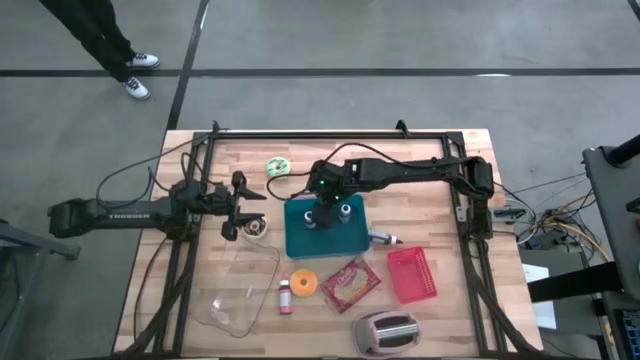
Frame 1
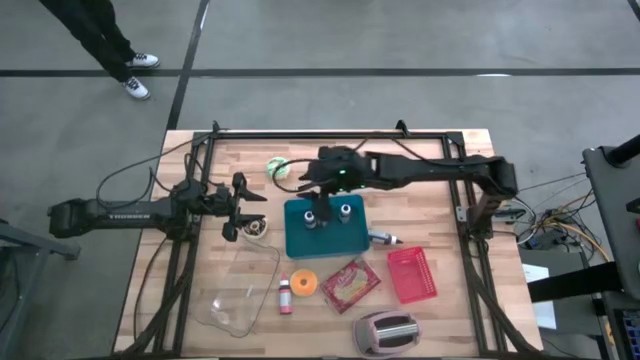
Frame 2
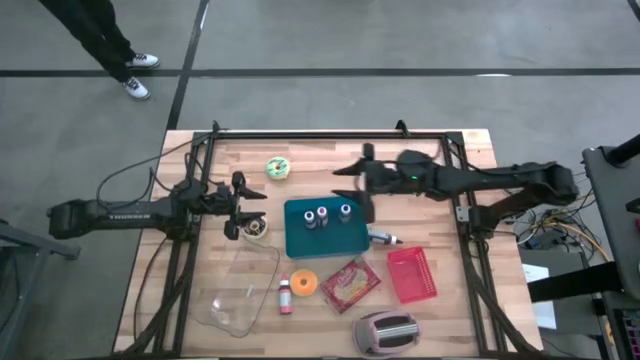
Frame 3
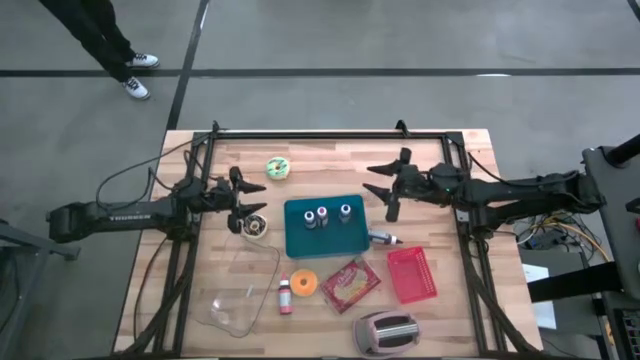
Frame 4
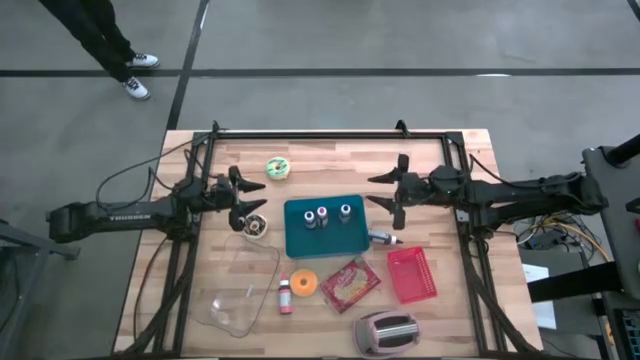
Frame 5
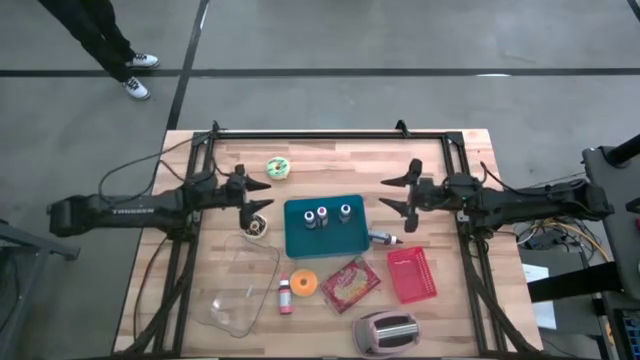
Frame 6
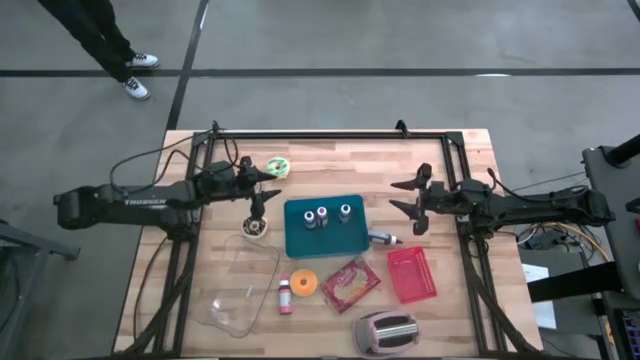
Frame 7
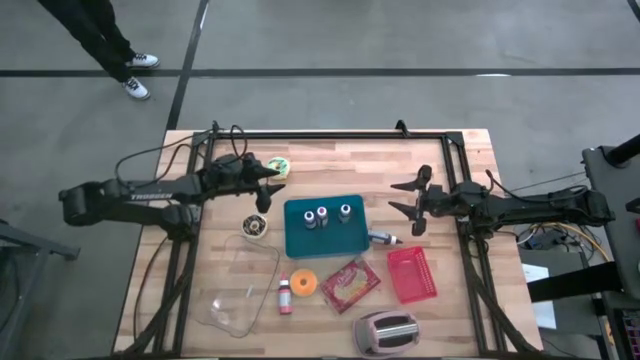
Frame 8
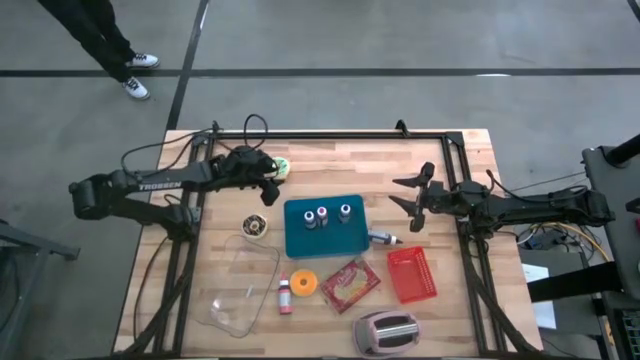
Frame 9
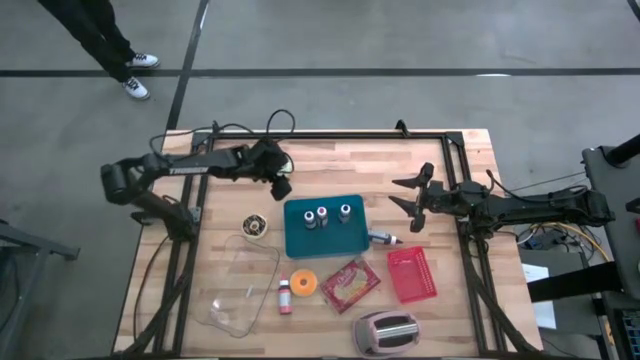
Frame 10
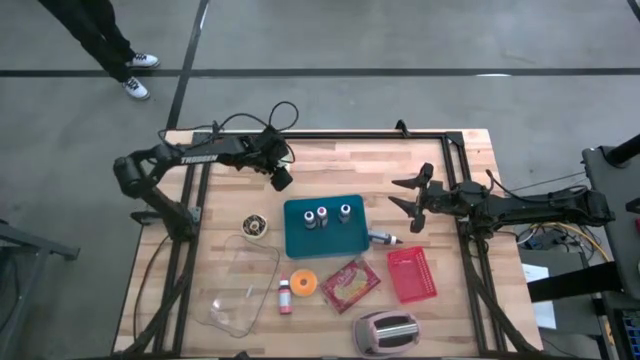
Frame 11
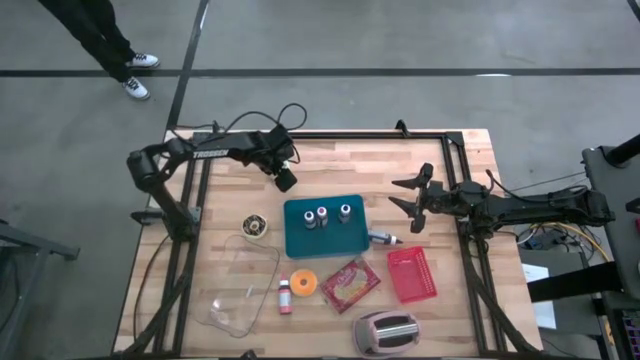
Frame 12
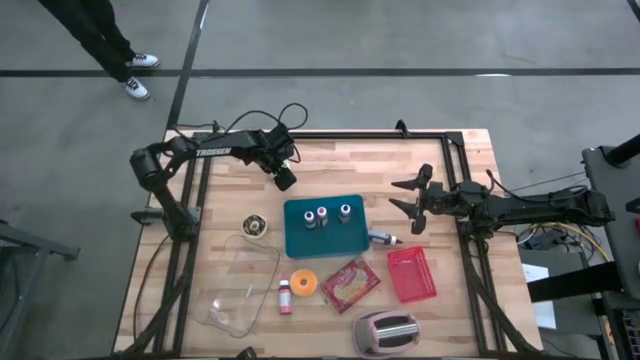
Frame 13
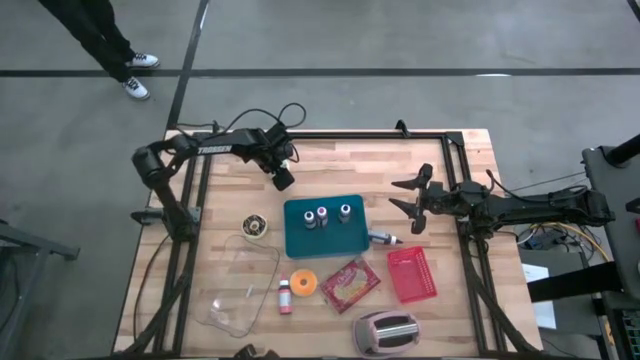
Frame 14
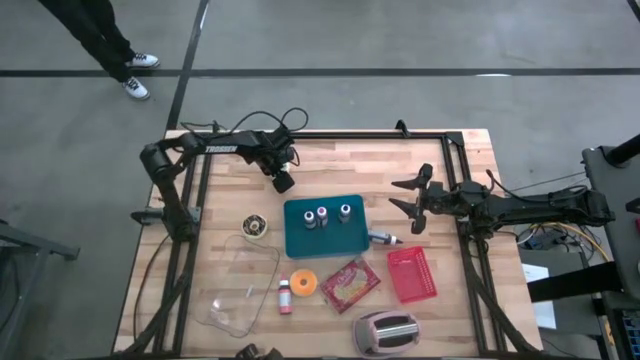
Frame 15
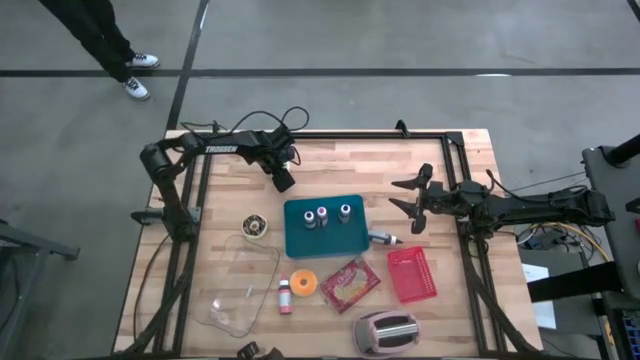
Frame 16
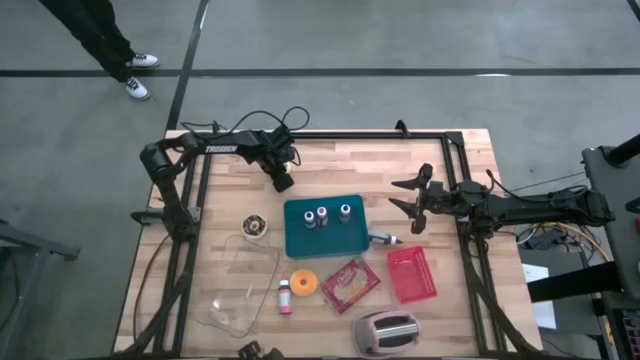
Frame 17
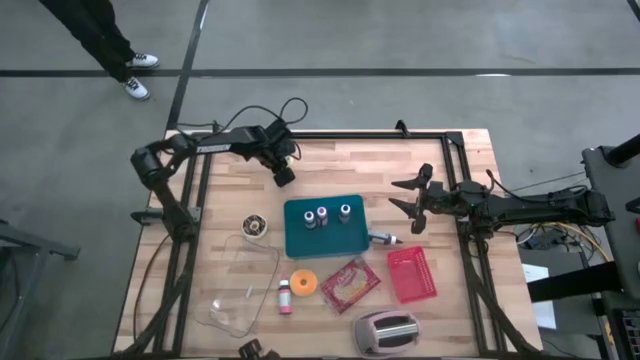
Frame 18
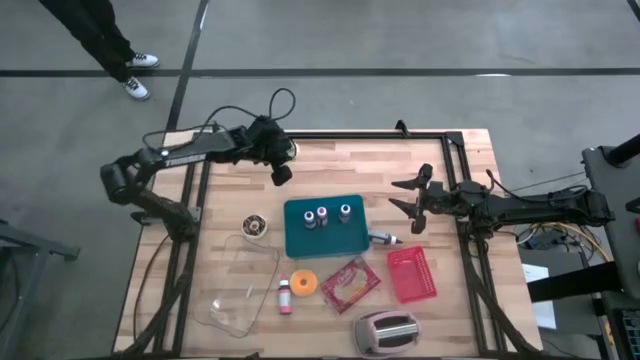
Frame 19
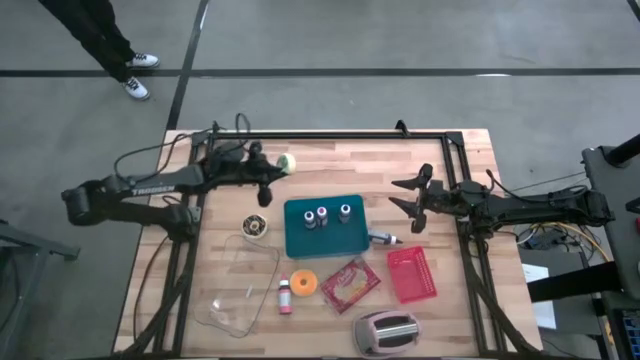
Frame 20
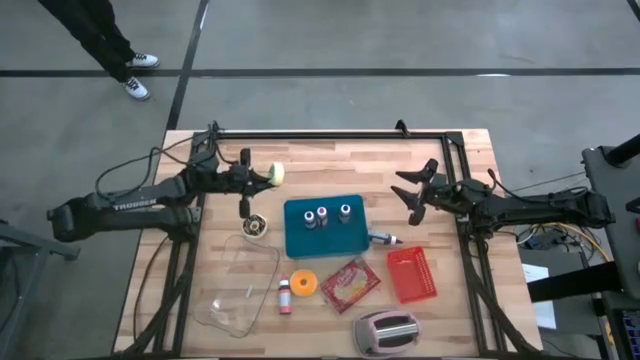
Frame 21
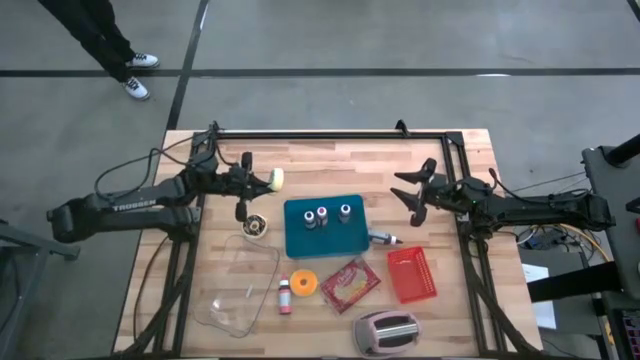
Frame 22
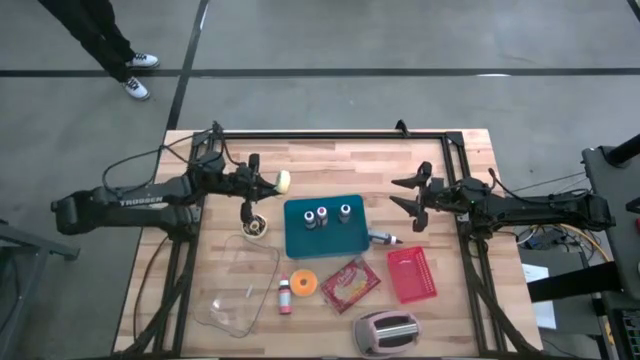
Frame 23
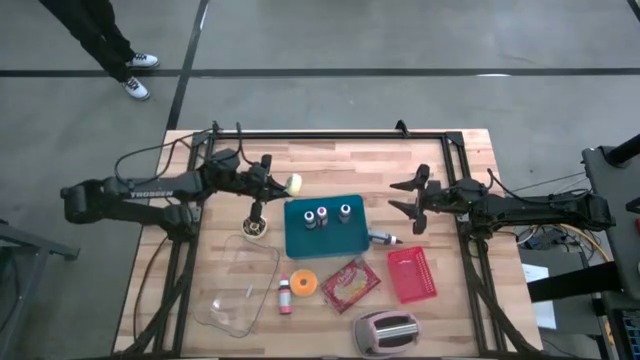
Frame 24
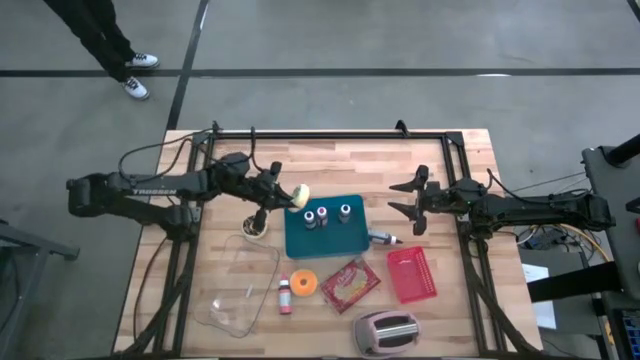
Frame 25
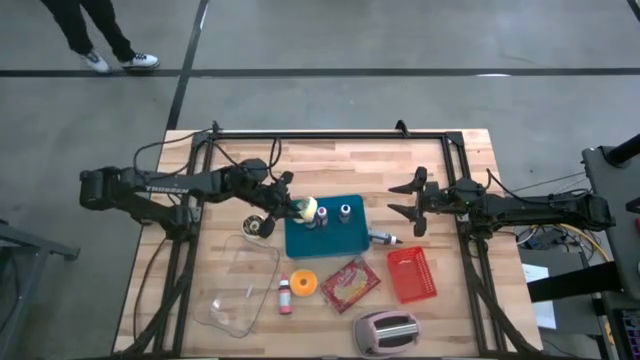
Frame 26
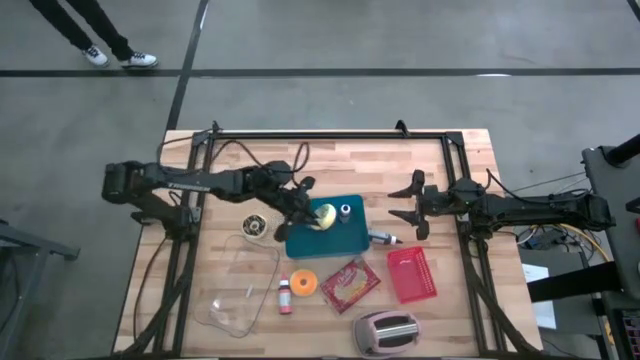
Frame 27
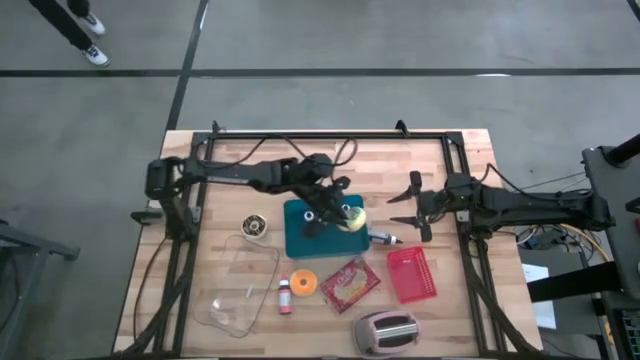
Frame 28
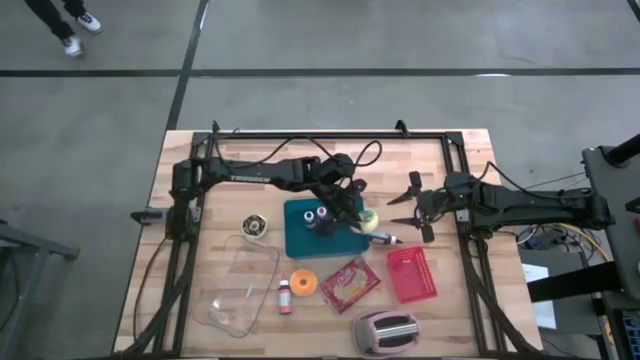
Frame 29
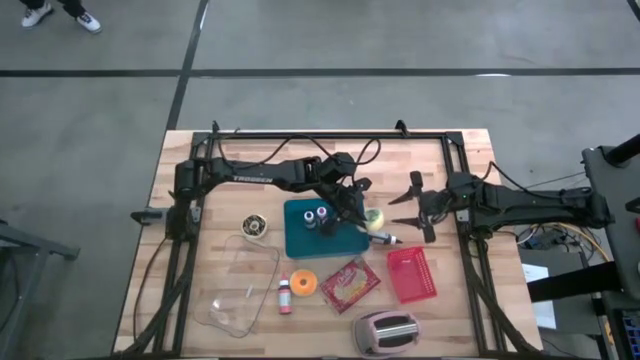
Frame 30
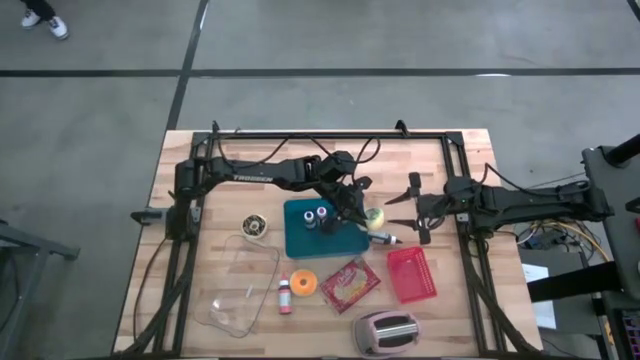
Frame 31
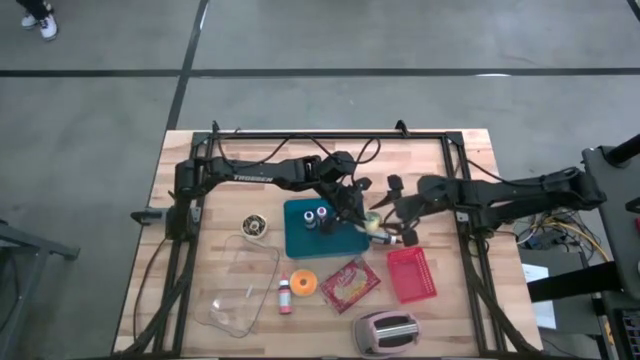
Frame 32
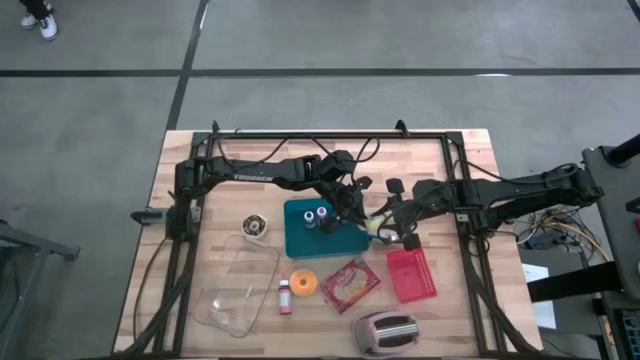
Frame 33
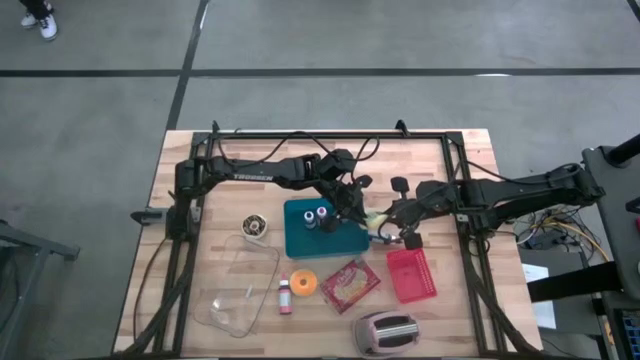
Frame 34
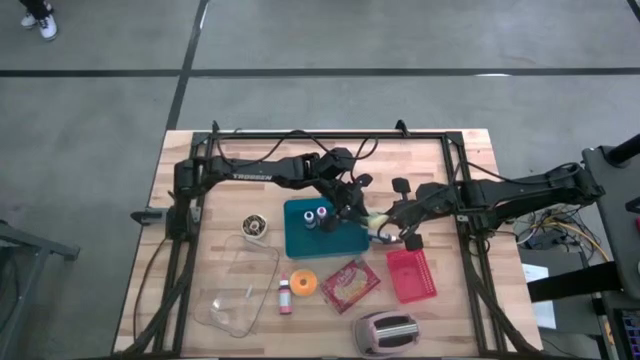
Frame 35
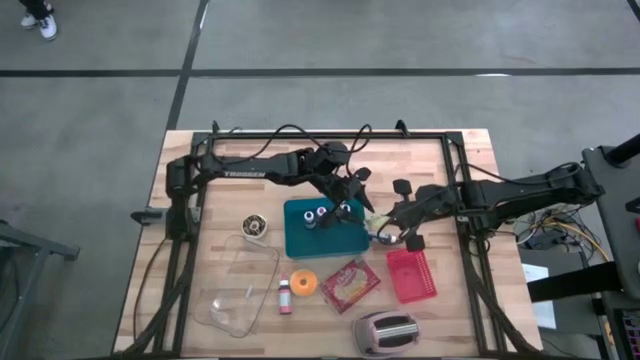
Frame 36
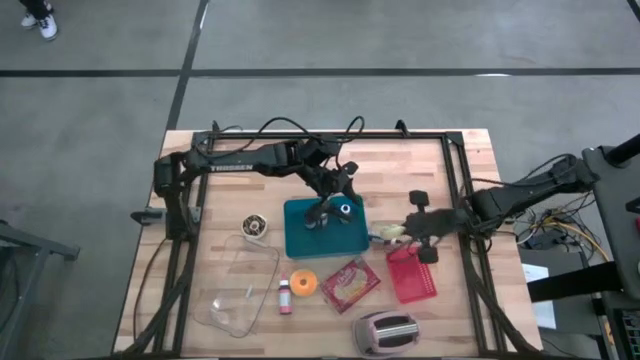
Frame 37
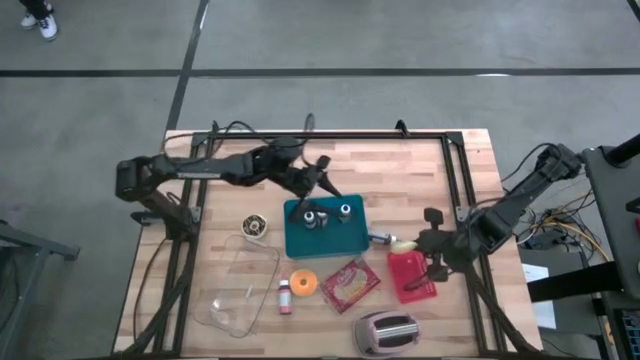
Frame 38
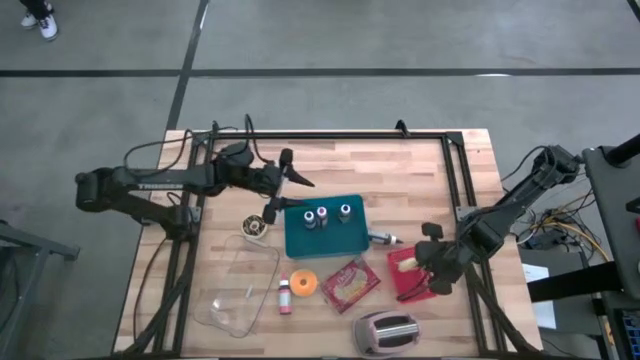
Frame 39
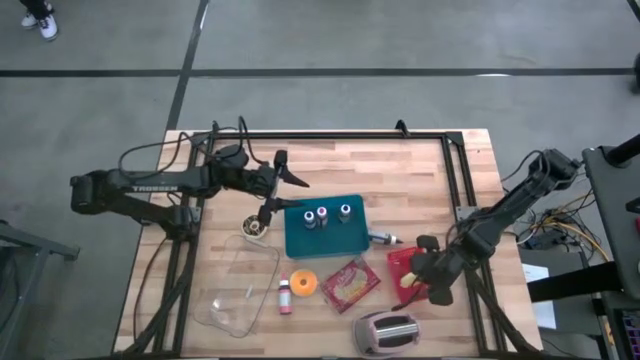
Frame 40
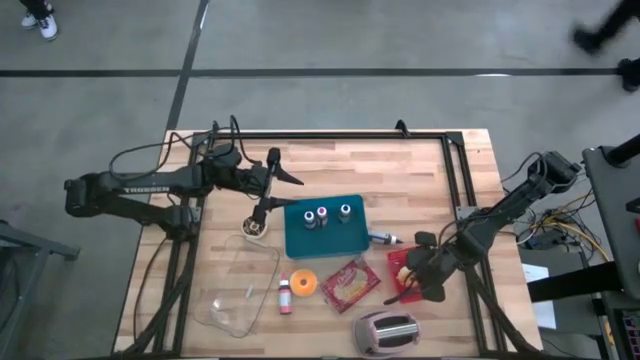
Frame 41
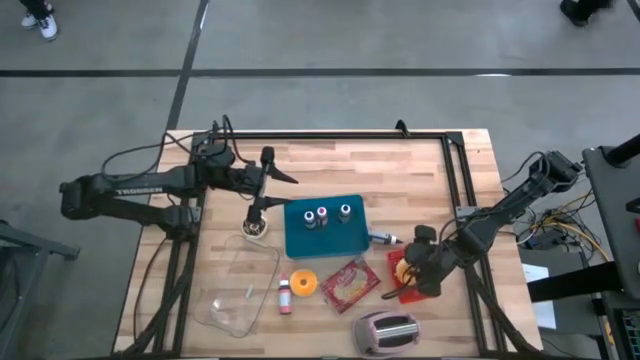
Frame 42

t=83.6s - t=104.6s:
Task: Pick & Place Food Item
Put the green donut into the red bin
